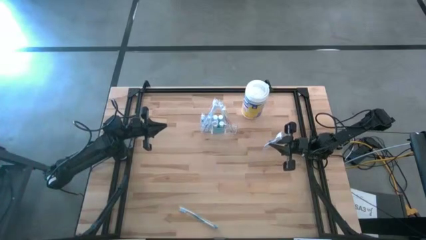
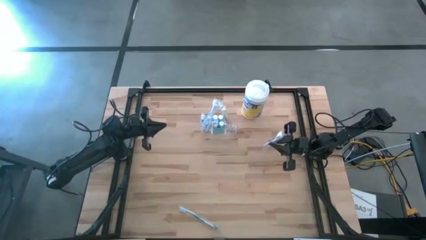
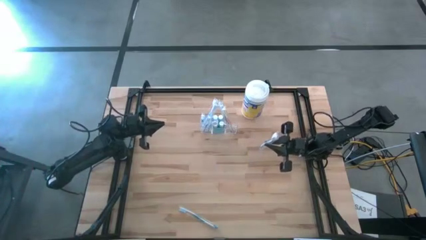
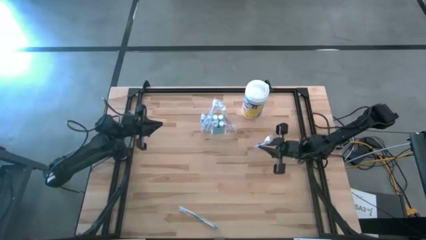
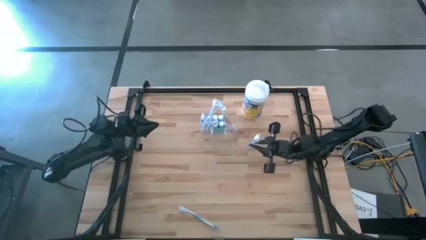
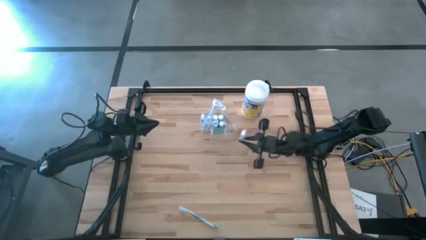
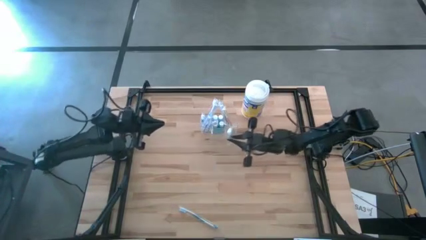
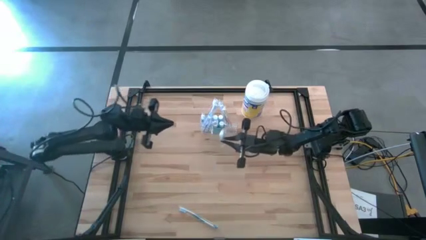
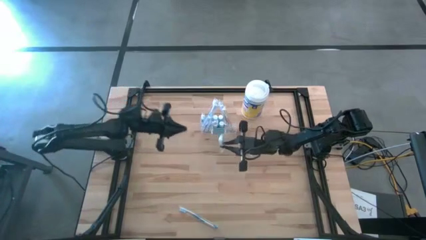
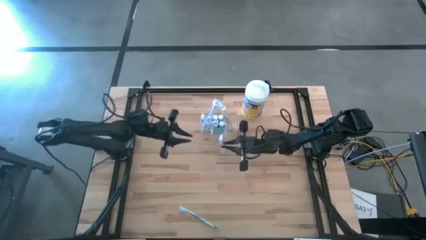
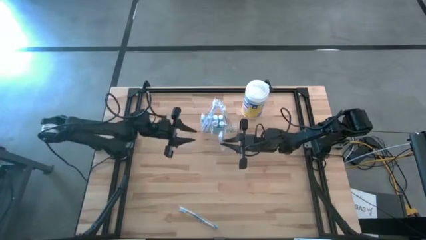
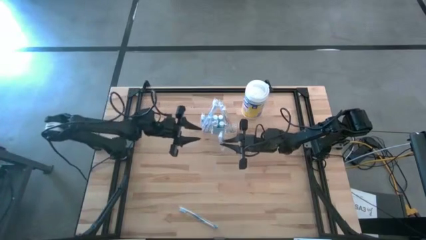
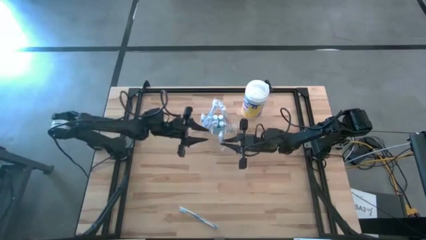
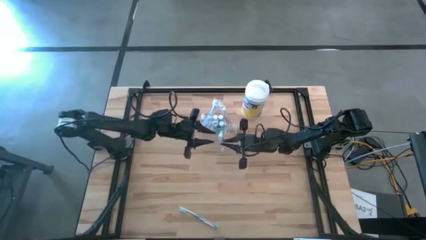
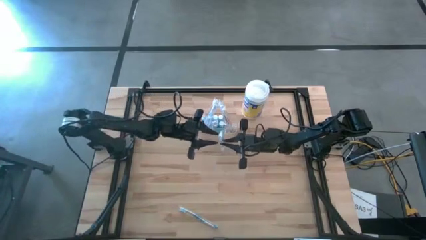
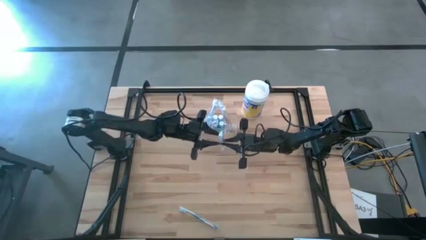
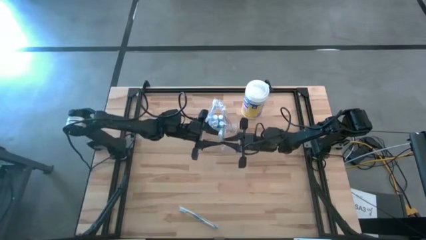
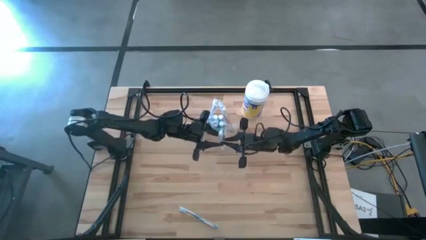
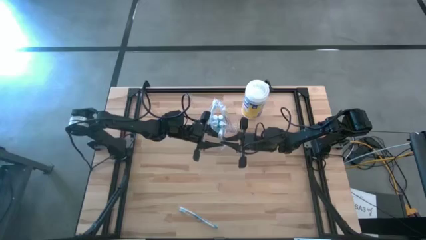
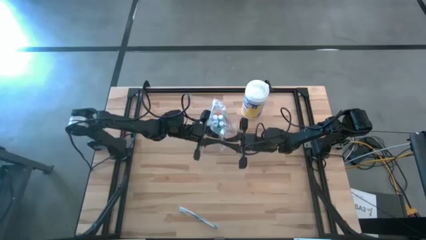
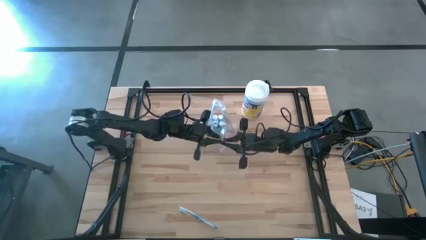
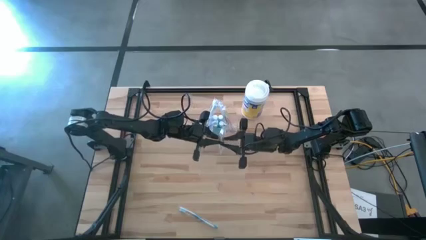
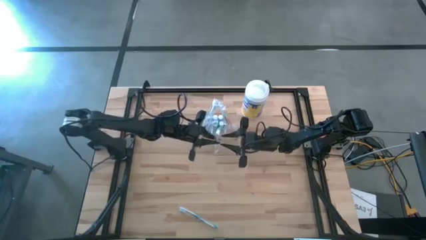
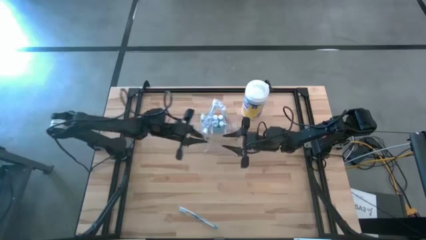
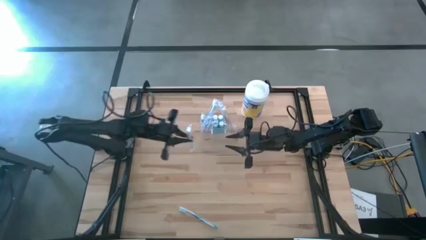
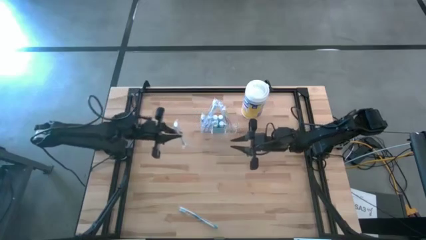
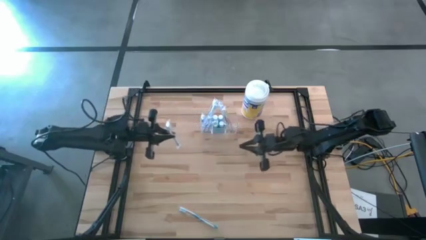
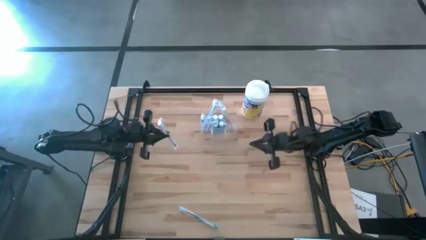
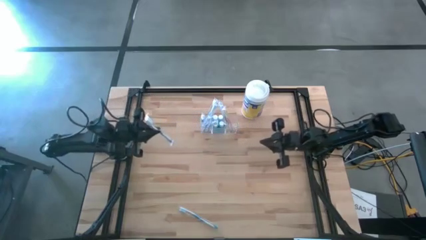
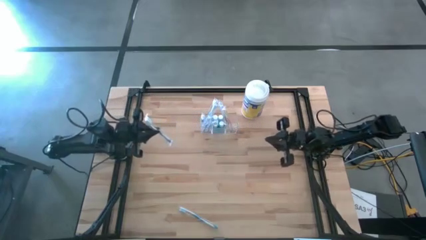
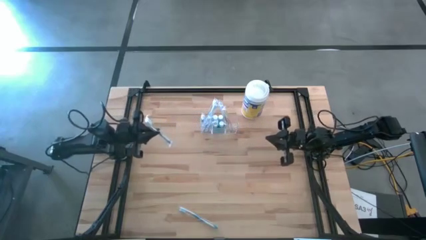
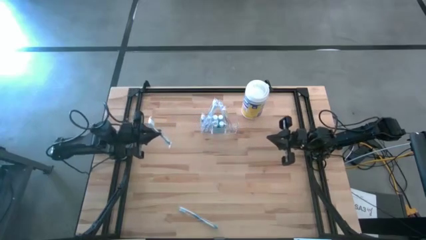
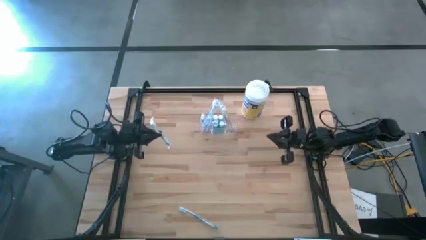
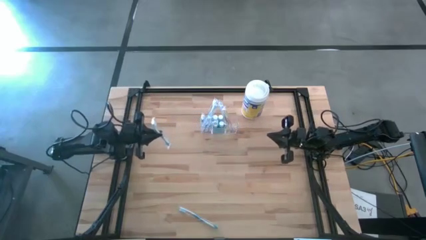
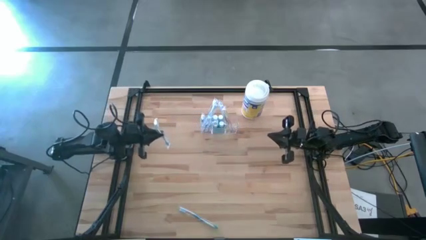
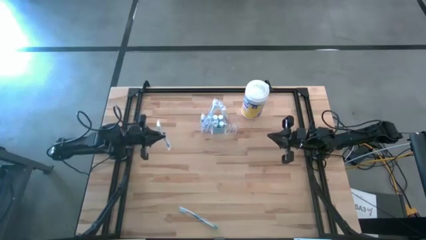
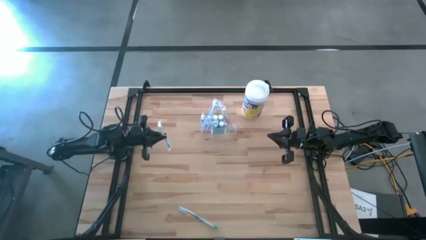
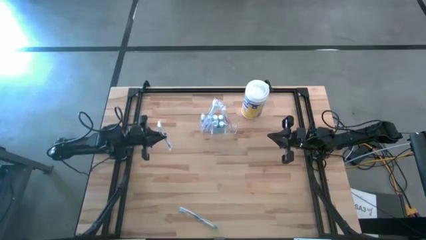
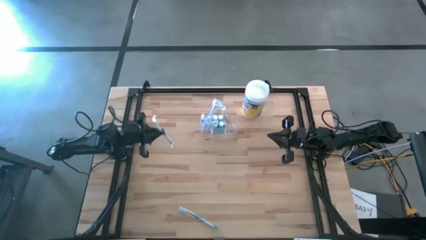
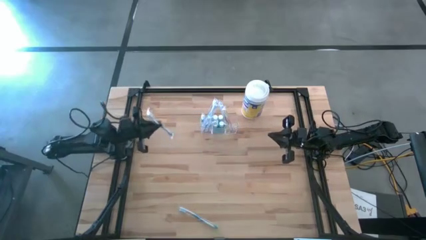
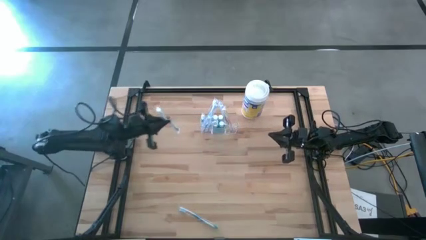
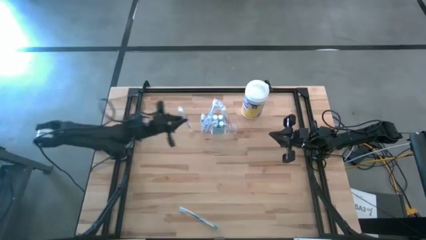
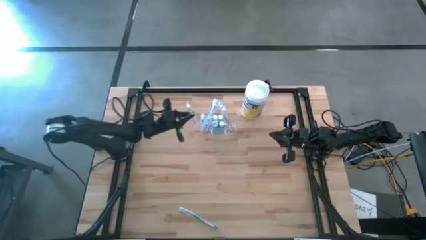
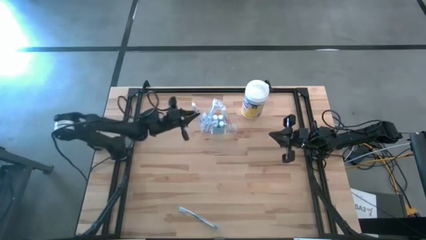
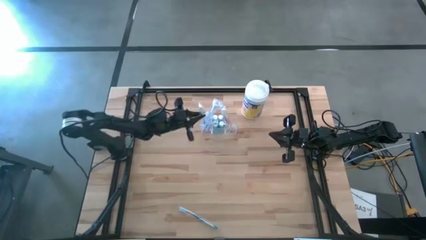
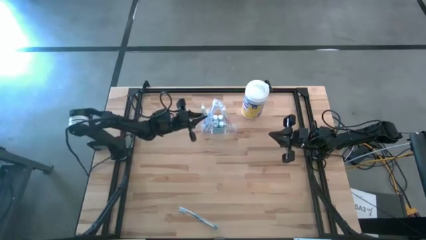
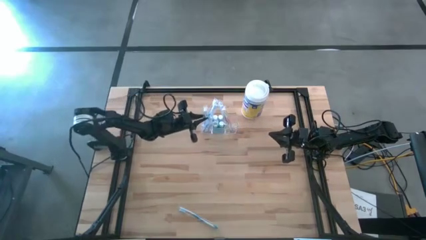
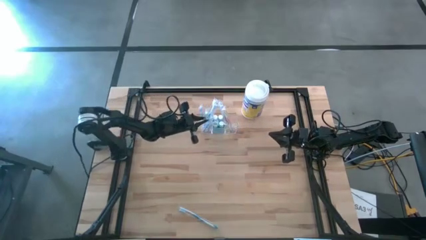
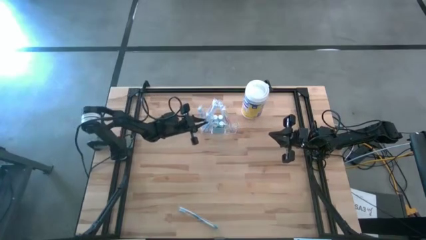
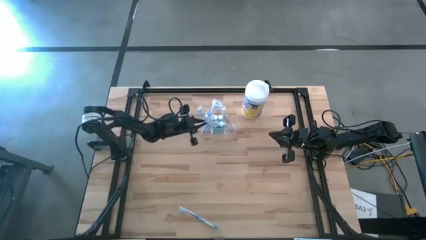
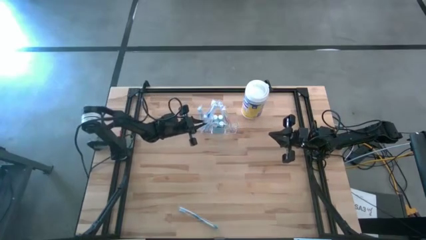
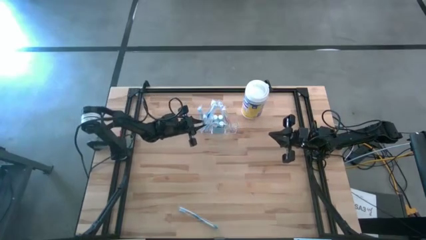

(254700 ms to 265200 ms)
Task: Pick & Place toothbrushing station
Put the blue toothbrush into the transparent organizer
